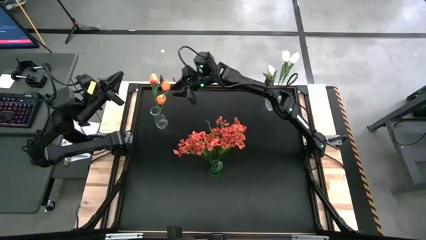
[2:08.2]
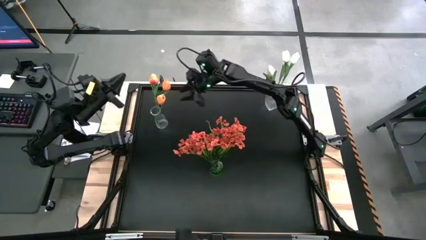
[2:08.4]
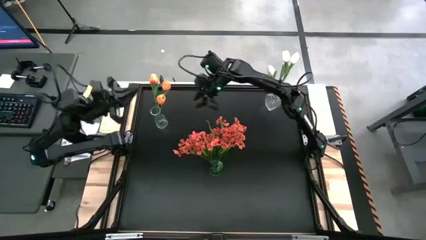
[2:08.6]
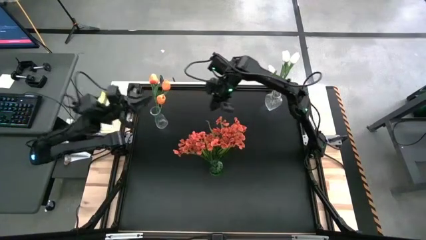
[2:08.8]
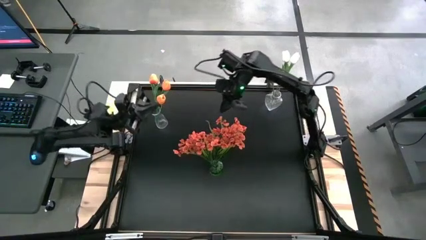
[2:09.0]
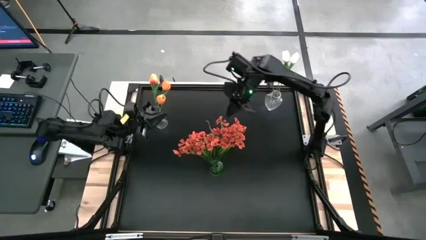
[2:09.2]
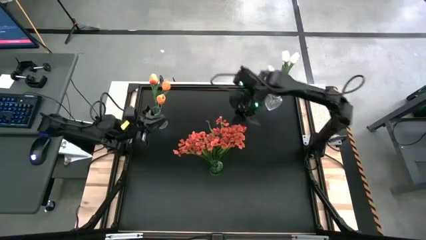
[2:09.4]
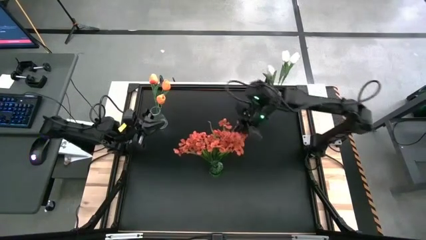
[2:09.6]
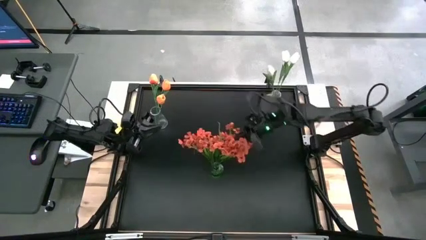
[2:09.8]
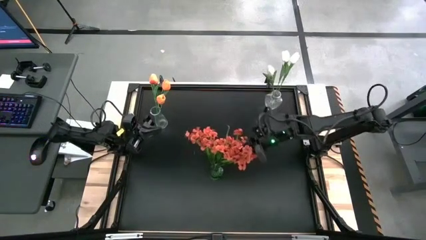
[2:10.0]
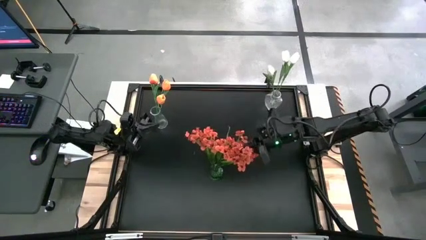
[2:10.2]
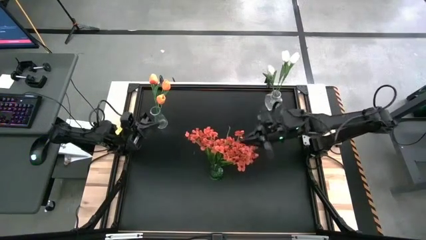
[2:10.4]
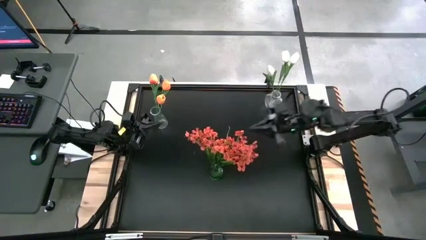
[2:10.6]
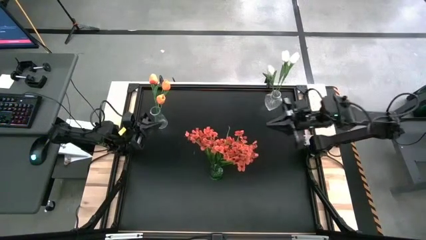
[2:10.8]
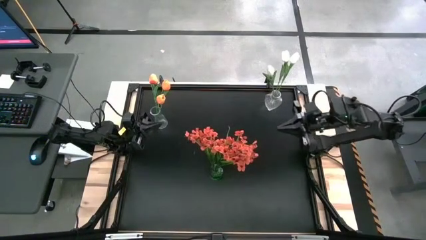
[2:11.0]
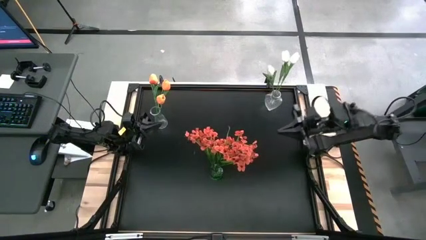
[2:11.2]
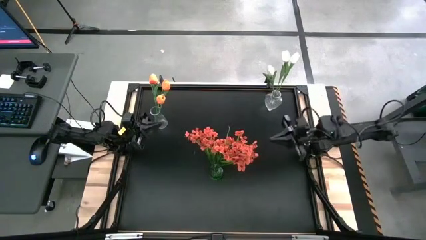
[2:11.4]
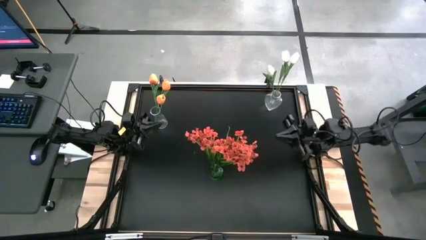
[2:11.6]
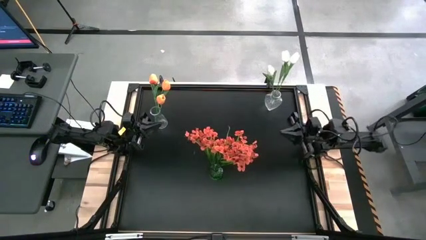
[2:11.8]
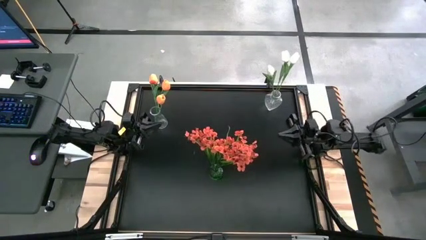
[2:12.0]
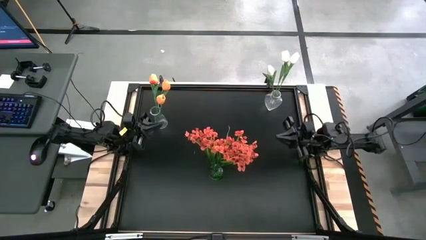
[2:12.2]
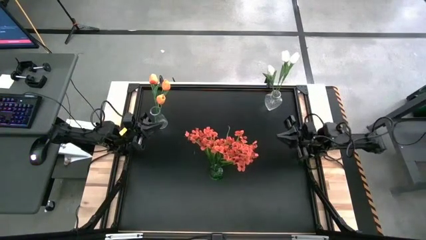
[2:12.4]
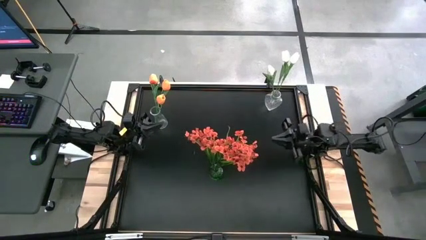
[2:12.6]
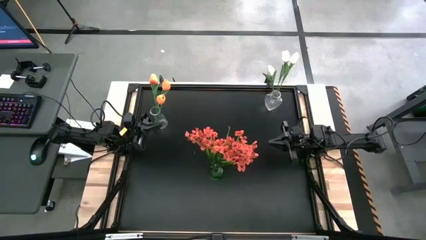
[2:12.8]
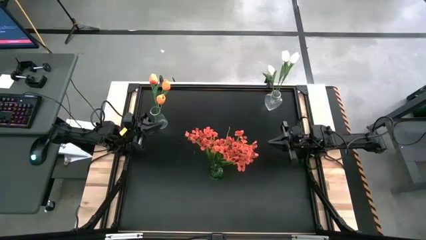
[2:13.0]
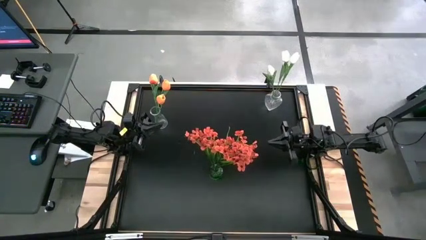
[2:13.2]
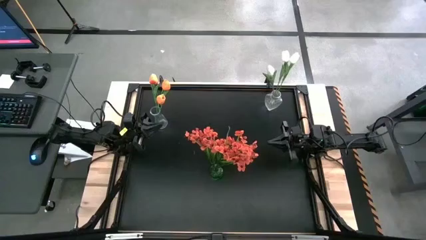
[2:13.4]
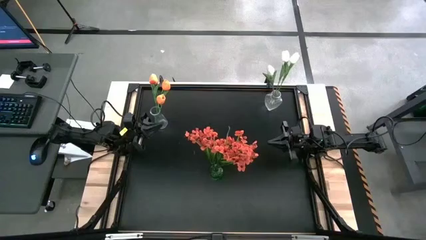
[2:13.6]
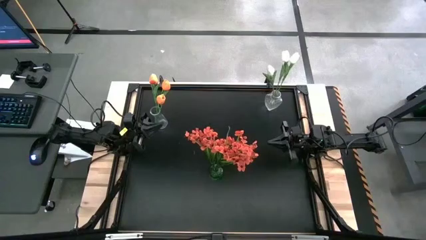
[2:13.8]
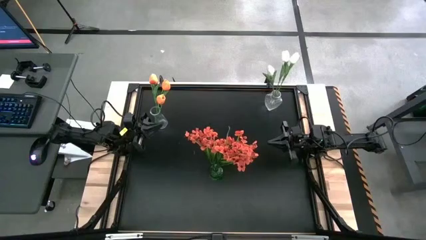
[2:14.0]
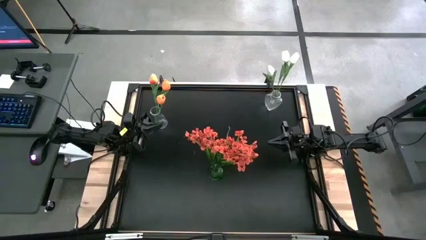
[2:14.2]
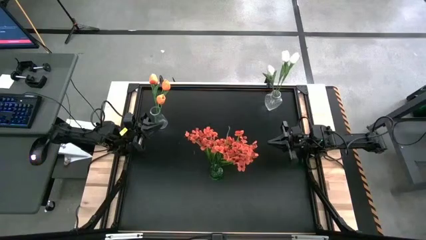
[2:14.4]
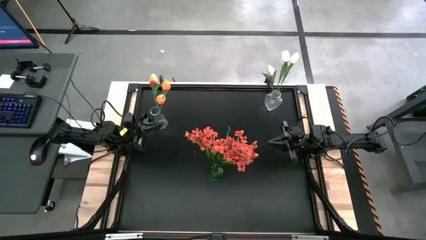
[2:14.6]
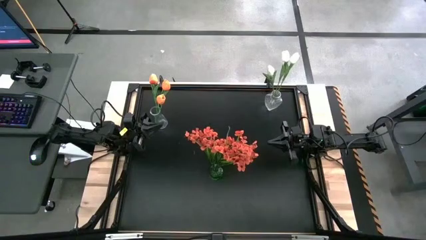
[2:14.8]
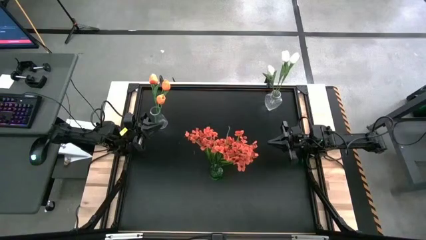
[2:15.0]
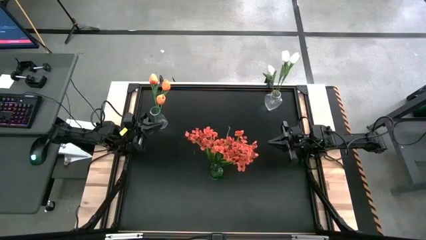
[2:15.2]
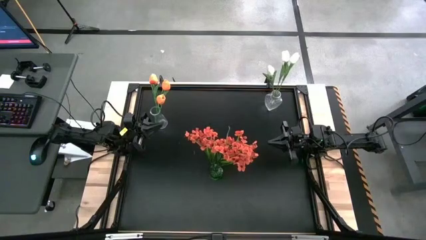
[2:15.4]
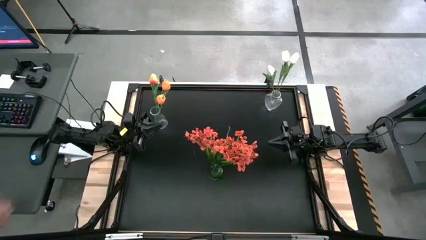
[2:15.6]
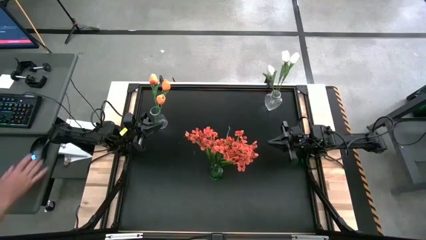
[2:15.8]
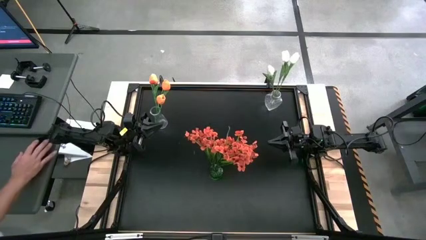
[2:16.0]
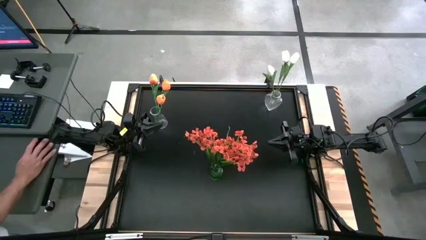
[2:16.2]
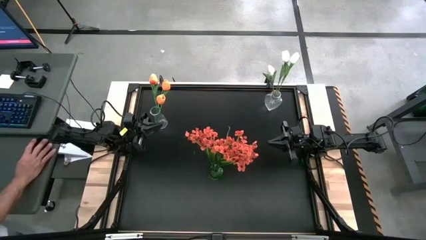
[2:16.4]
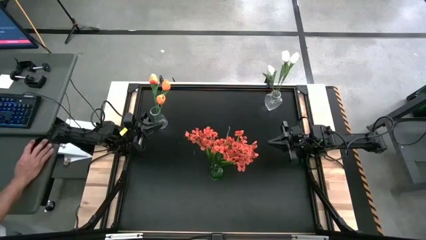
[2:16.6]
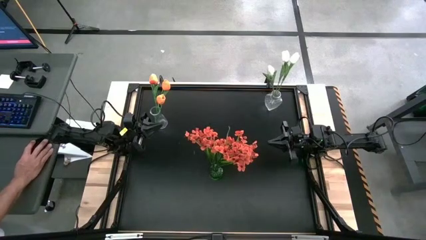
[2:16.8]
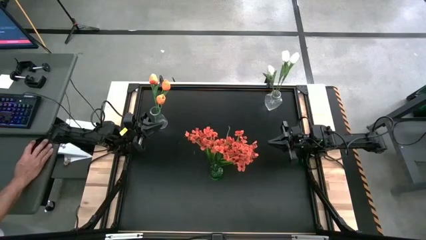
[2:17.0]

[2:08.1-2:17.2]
Task: Sort flowers into vase by color
Return to Home Position

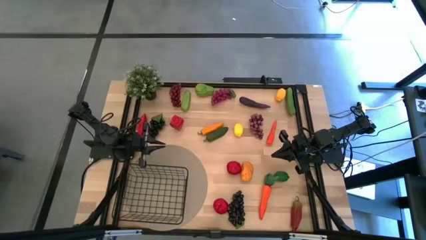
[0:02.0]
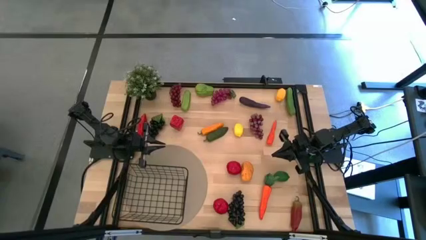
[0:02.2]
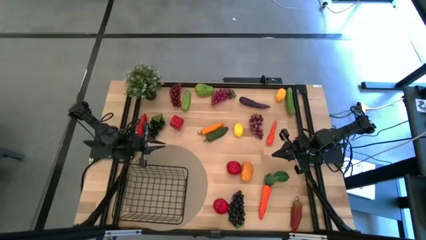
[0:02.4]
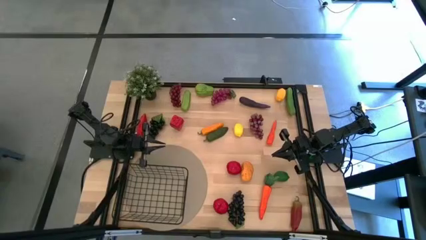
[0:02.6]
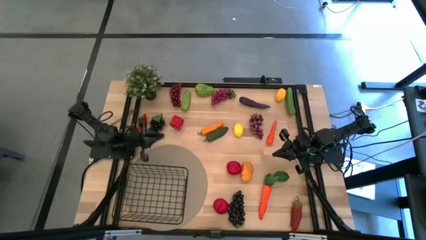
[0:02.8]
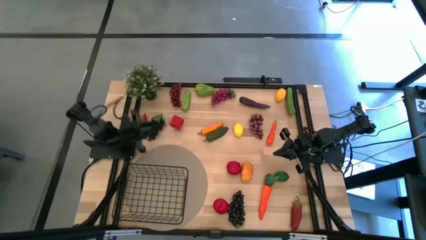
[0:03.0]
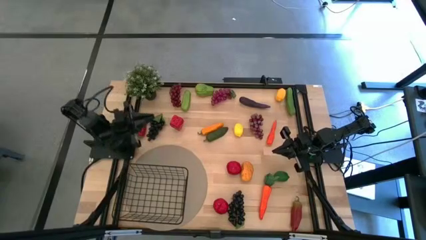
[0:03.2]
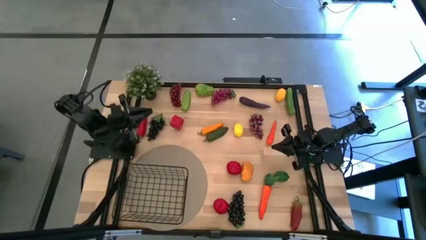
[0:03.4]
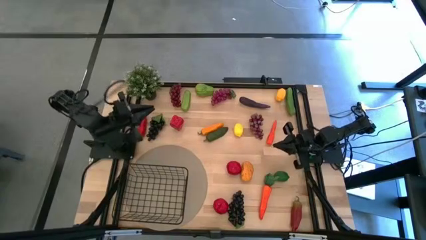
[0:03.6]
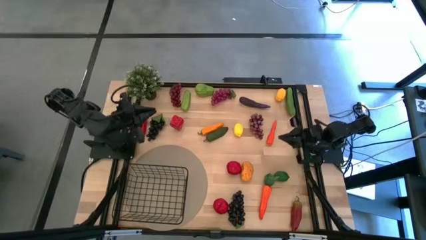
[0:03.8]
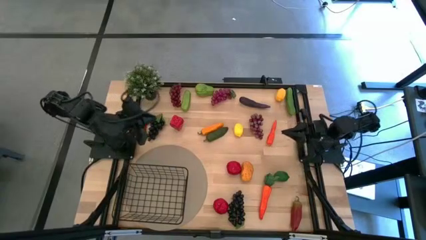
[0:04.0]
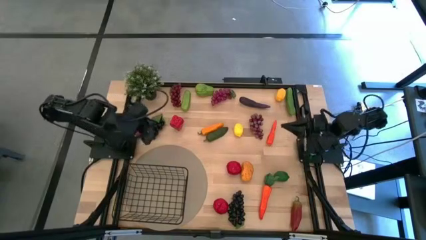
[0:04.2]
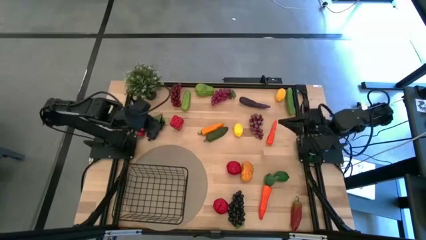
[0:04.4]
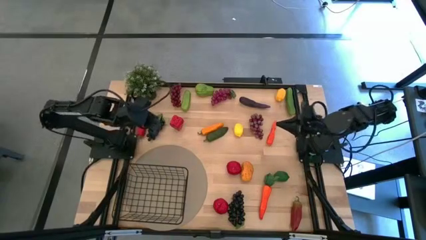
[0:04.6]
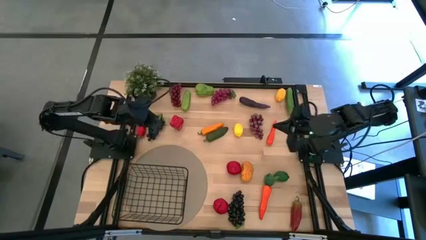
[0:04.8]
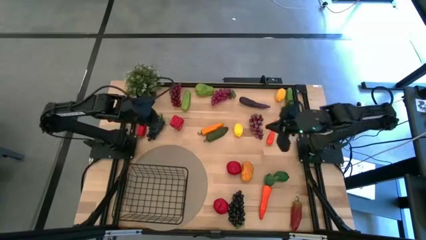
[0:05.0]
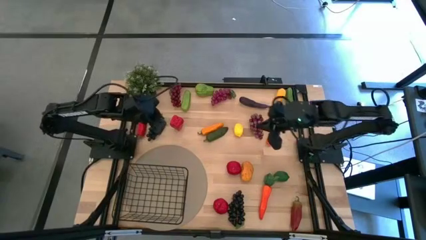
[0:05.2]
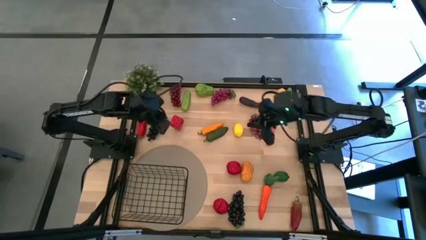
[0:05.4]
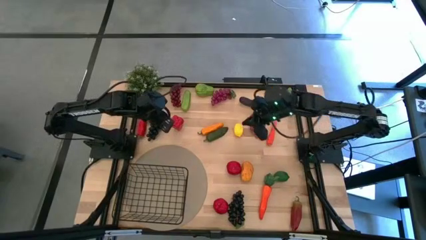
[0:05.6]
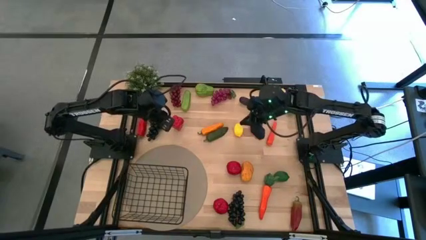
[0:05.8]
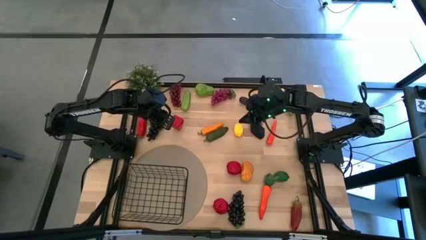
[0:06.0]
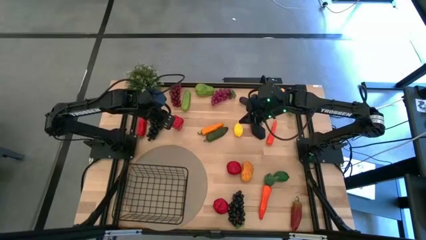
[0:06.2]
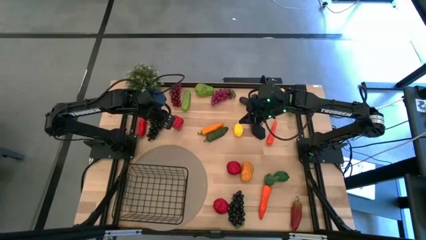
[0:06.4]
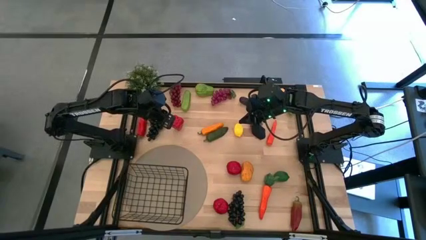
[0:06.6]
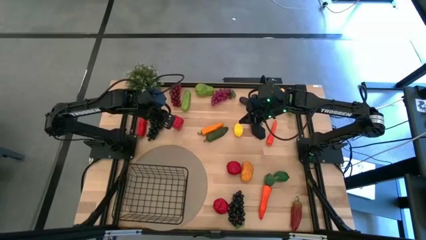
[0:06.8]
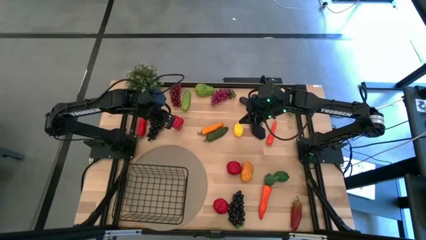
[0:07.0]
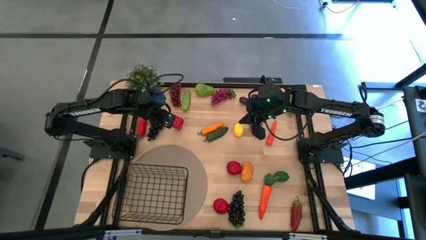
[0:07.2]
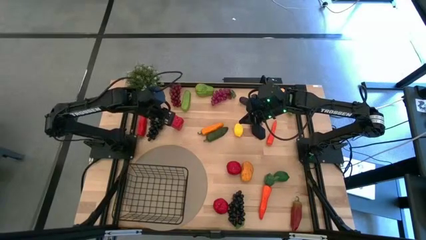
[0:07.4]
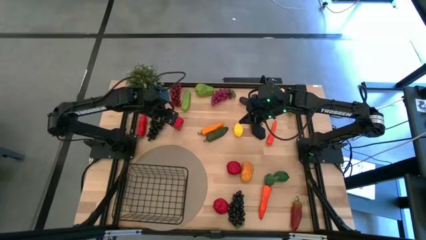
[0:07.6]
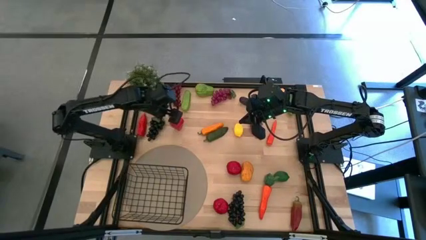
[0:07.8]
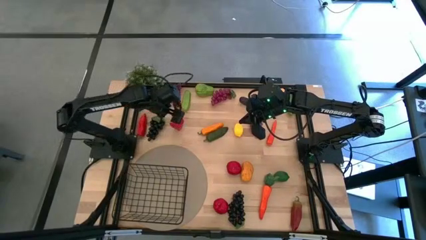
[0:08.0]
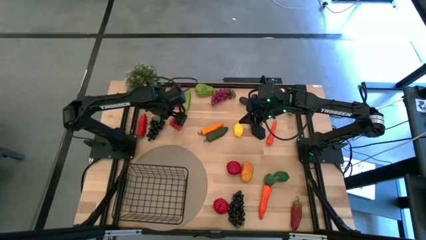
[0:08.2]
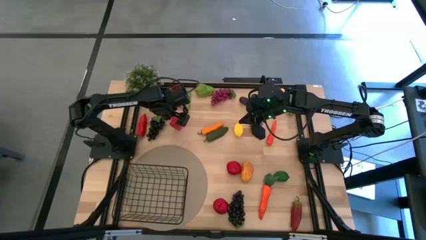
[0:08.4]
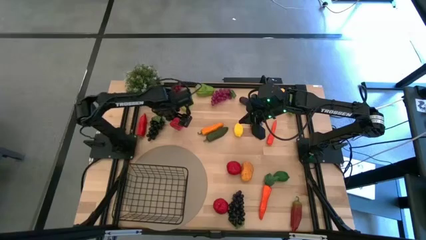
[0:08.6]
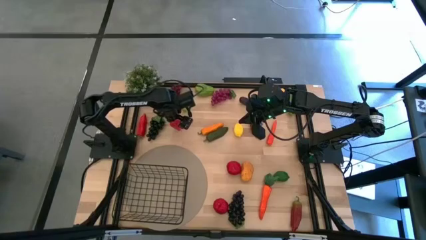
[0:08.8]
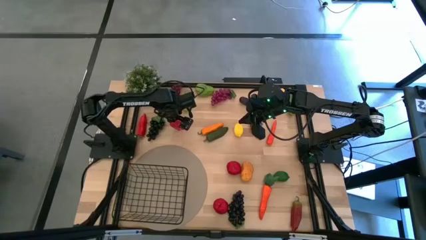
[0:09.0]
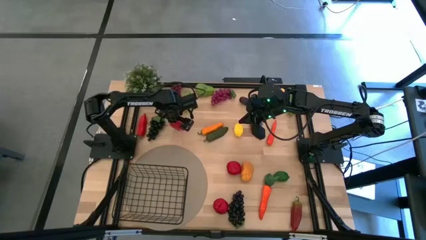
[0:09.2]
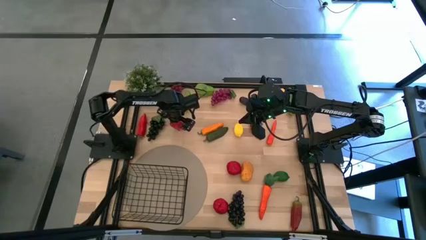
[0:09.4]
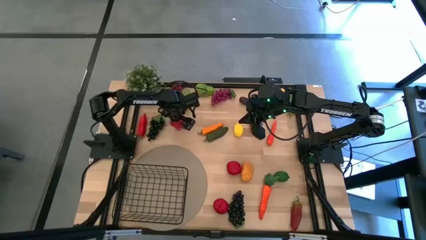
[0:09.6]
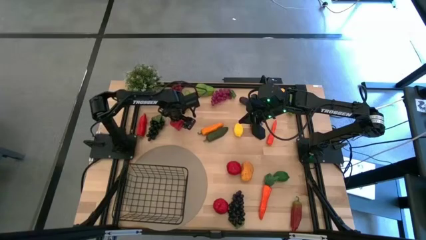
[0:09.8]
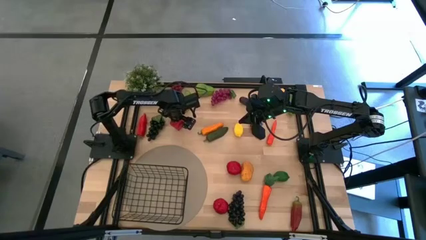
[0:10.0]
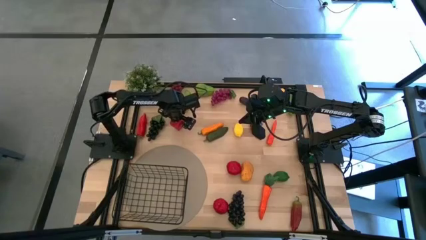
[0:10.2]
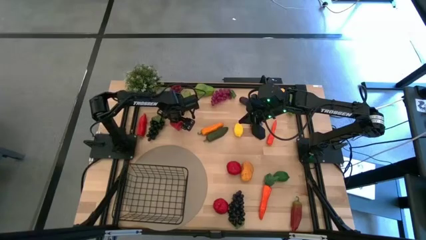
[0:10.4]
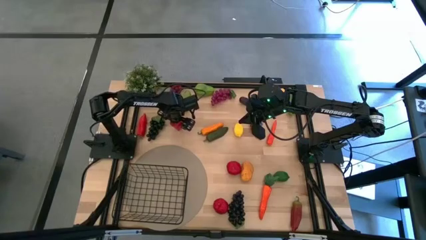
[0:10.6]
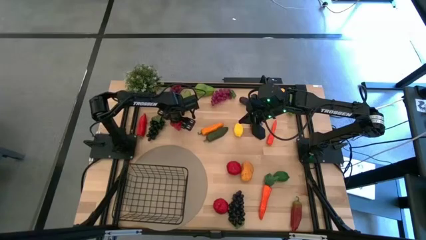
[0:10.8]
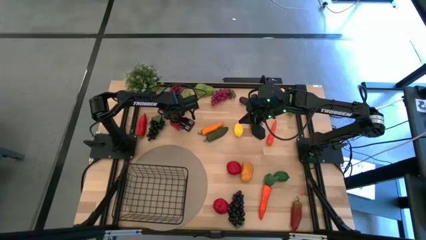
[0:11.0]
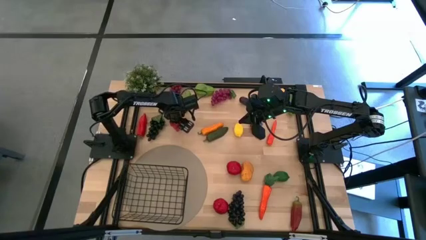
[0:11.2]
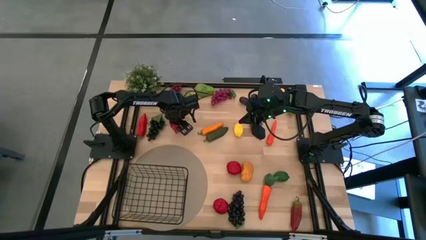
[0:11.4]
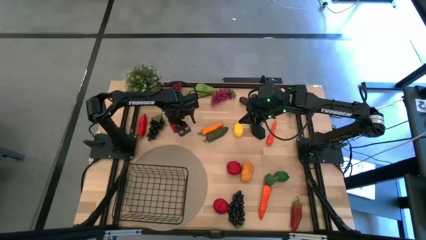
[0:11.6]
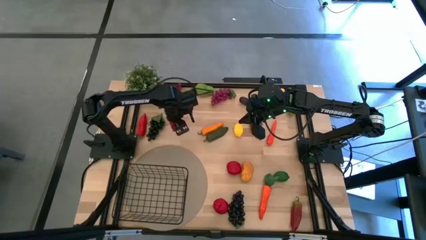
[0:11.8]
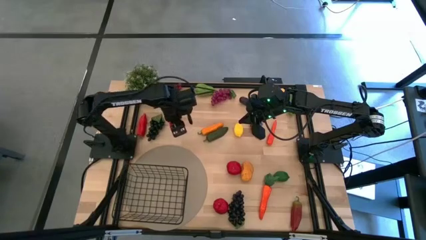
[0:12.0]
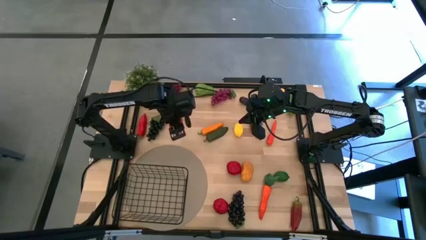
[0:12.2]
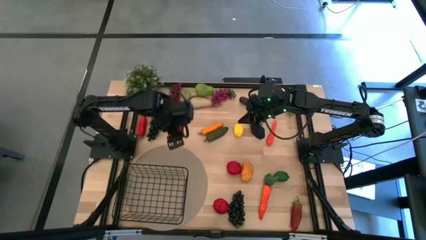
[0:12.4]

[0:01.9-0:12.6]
Task: Build produce basket
Put the red bell pepper into the black wire basket
